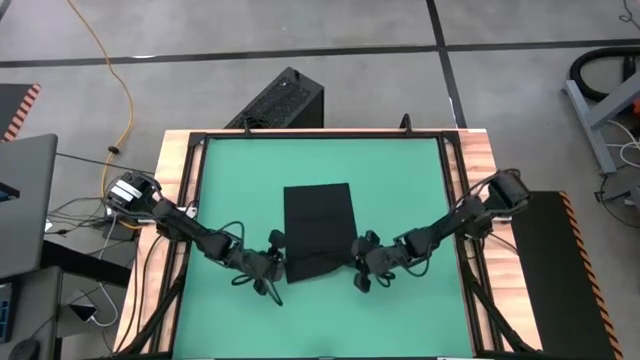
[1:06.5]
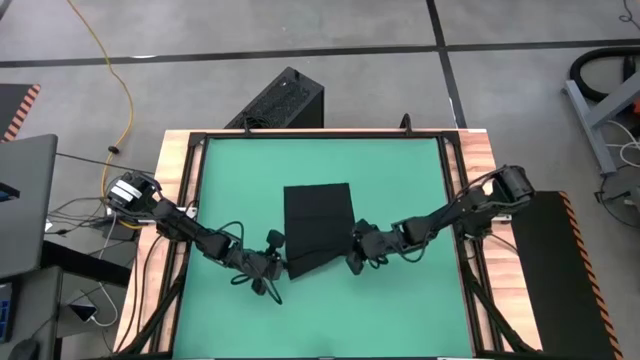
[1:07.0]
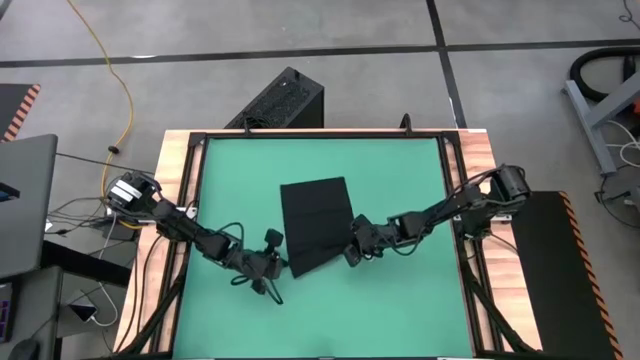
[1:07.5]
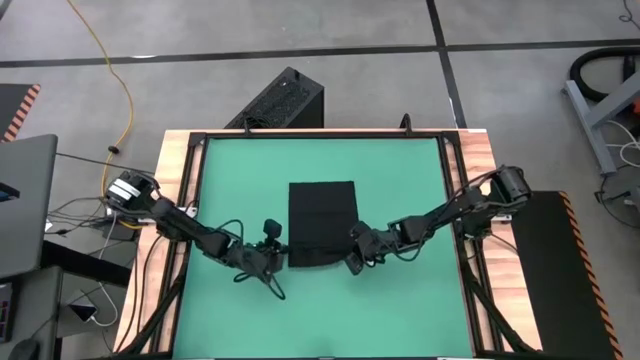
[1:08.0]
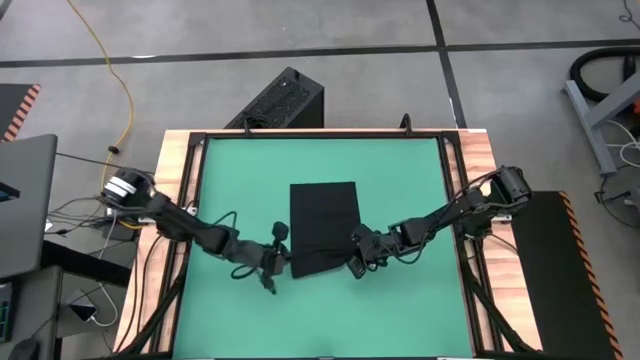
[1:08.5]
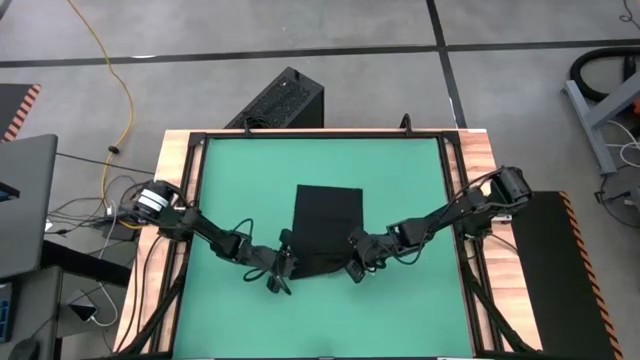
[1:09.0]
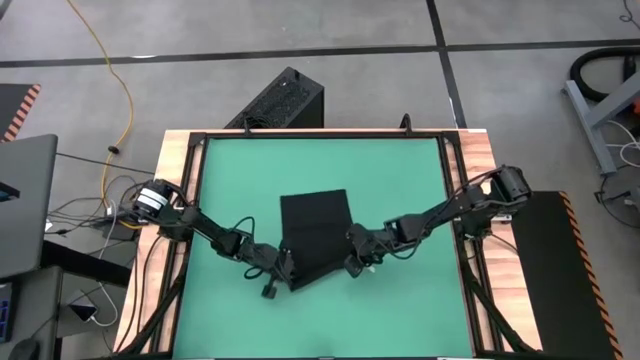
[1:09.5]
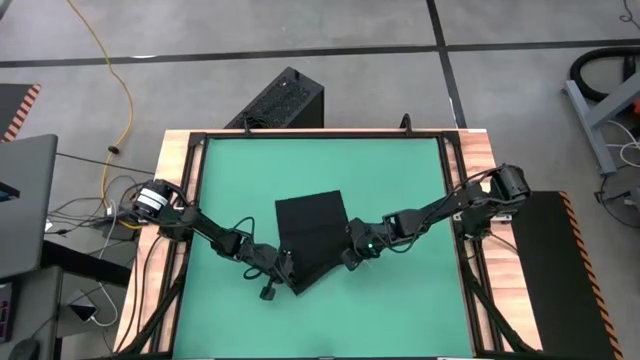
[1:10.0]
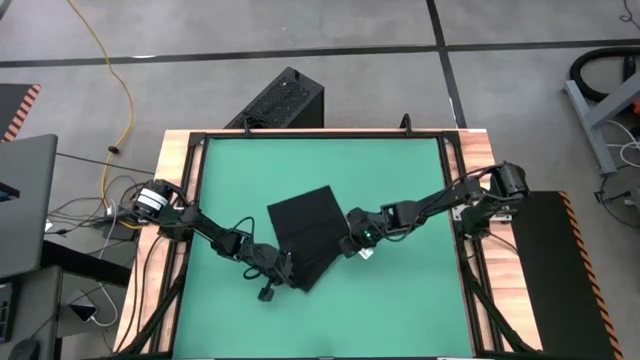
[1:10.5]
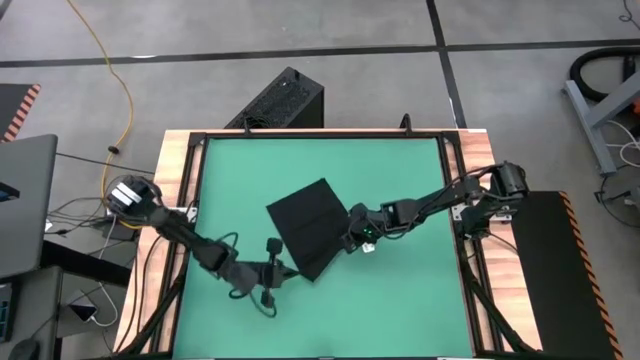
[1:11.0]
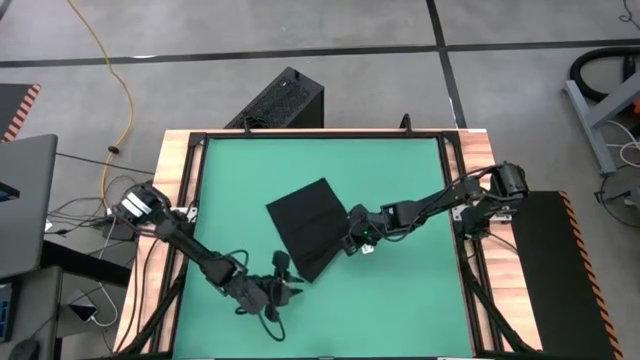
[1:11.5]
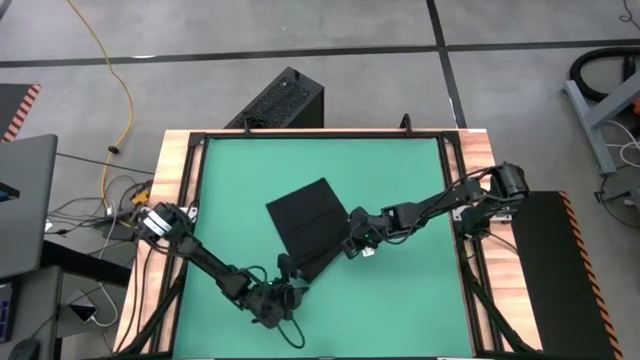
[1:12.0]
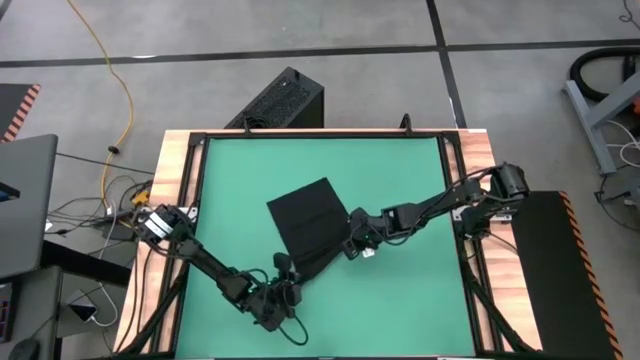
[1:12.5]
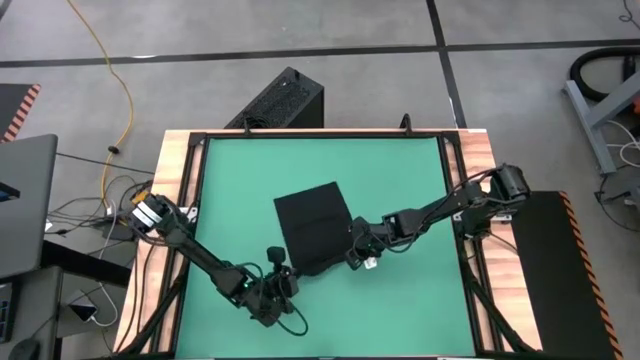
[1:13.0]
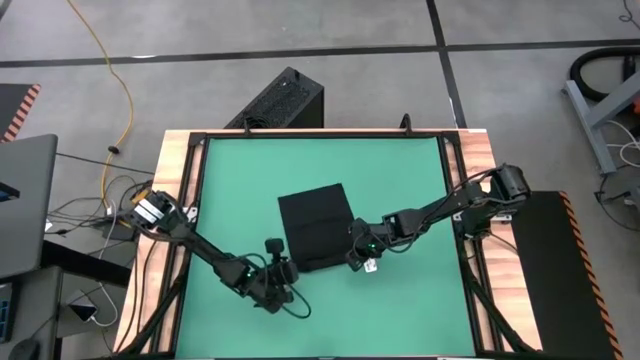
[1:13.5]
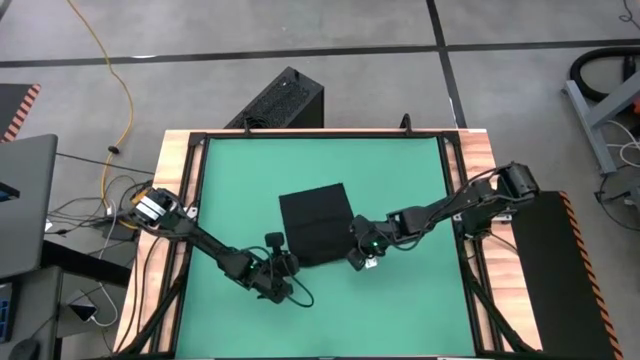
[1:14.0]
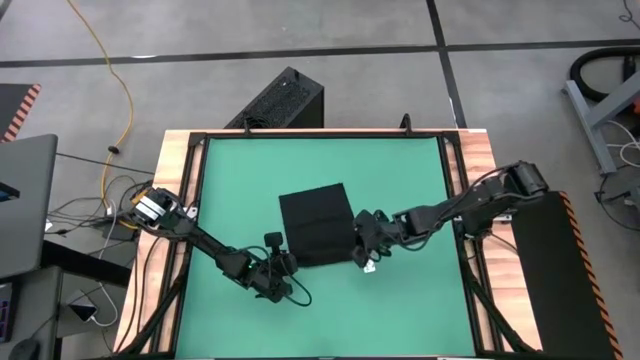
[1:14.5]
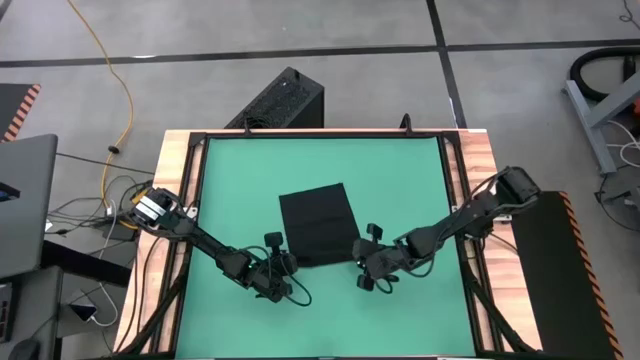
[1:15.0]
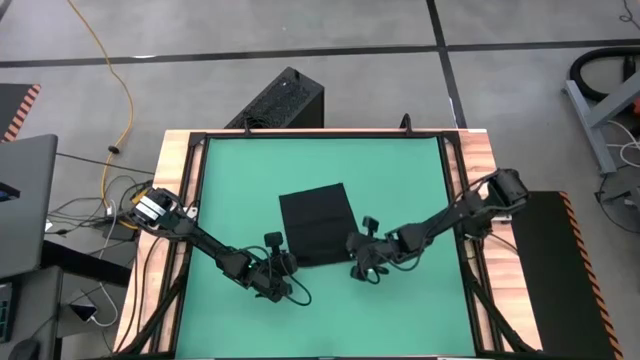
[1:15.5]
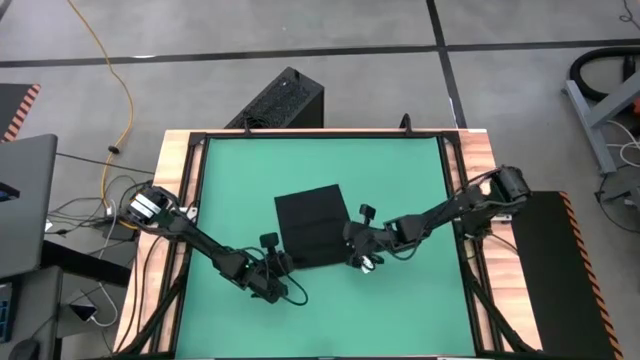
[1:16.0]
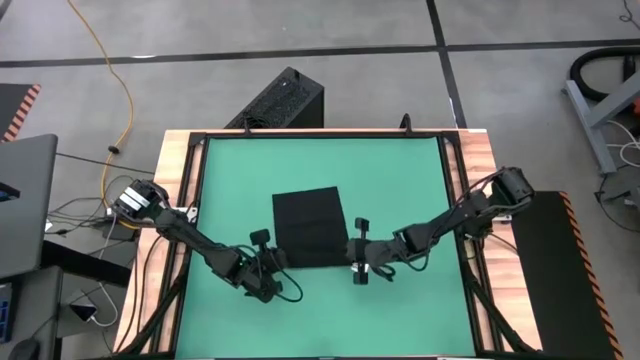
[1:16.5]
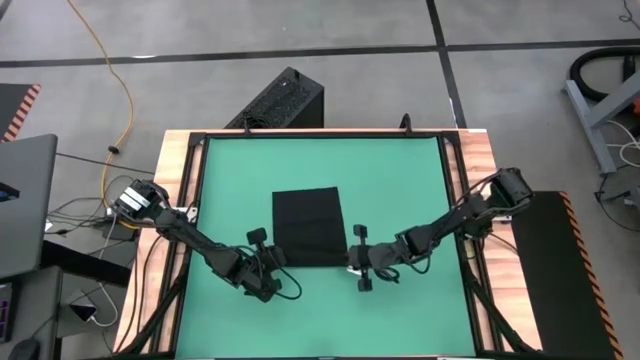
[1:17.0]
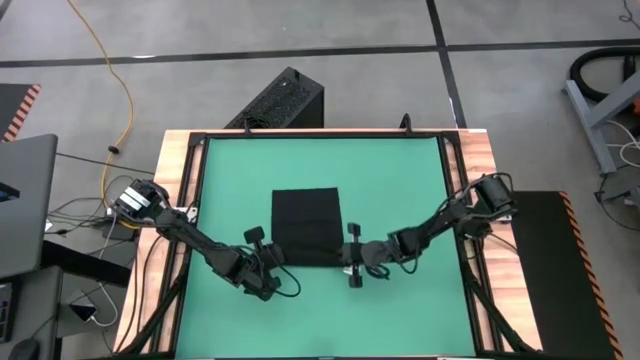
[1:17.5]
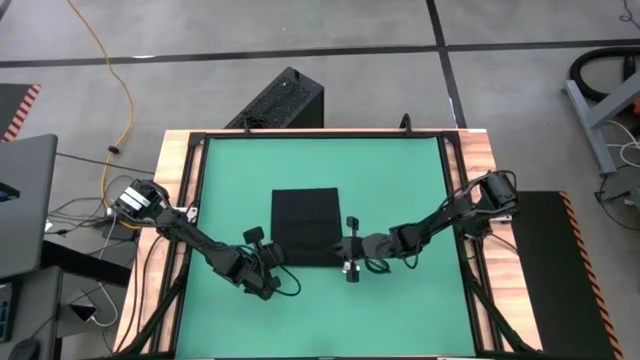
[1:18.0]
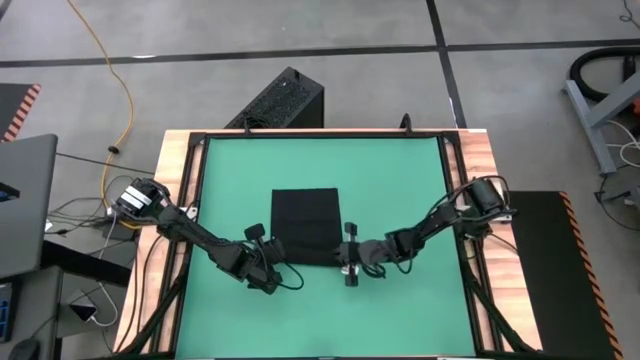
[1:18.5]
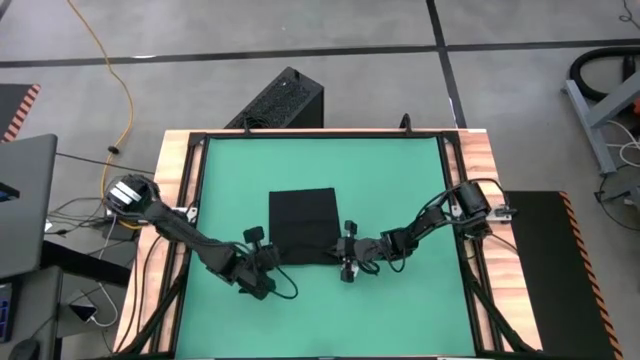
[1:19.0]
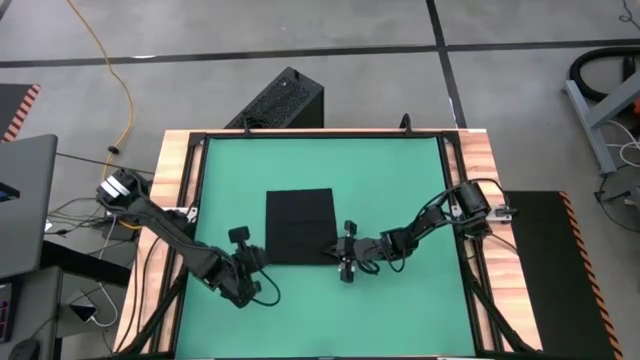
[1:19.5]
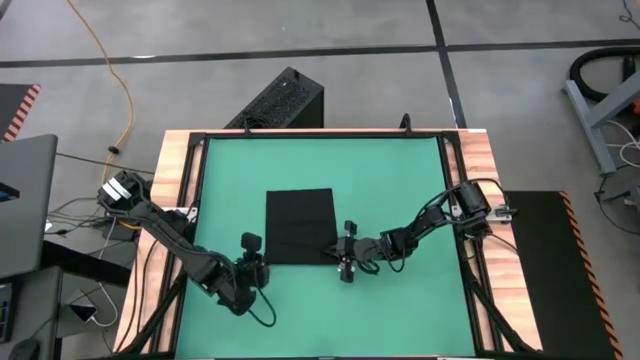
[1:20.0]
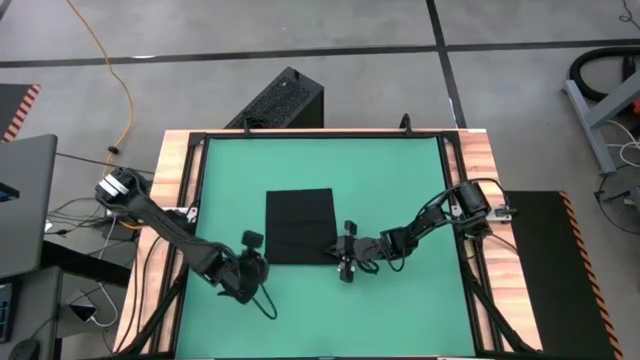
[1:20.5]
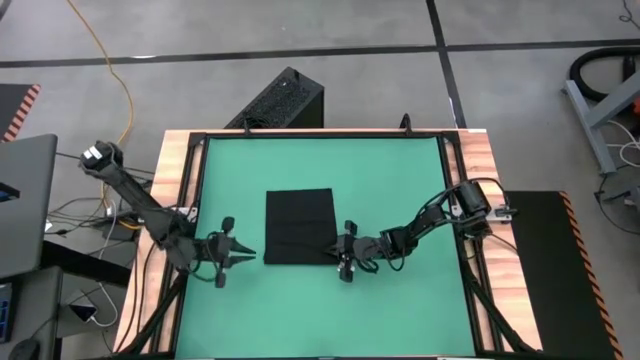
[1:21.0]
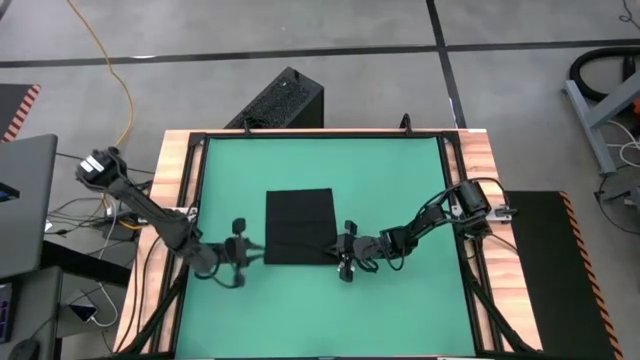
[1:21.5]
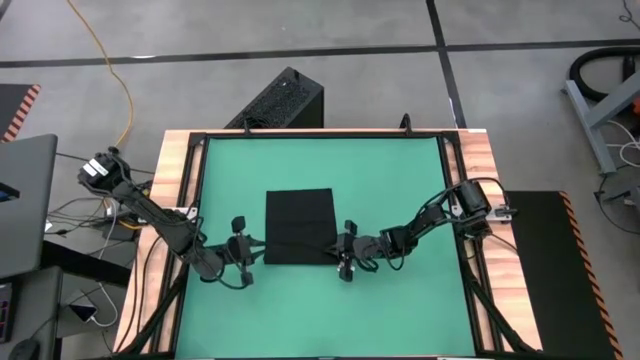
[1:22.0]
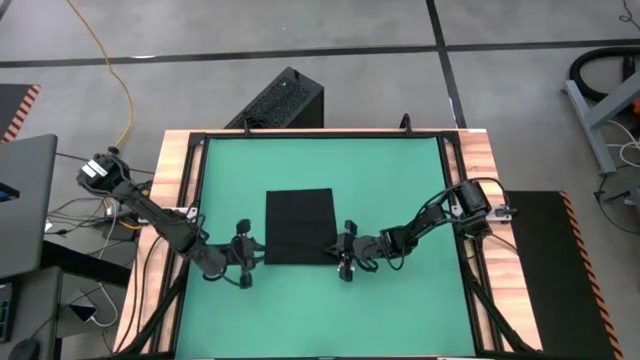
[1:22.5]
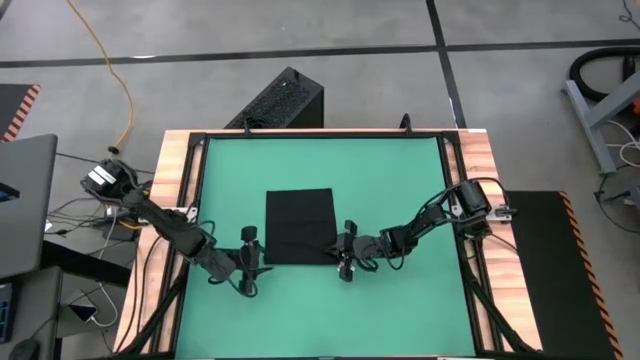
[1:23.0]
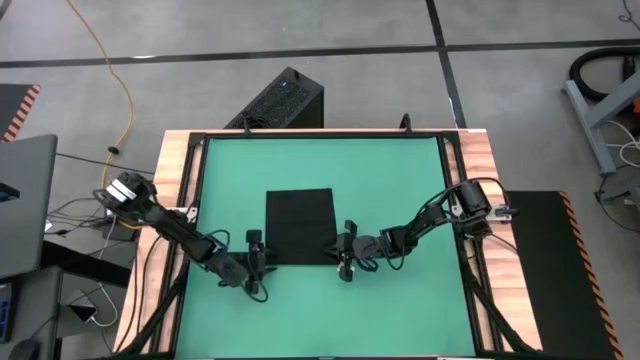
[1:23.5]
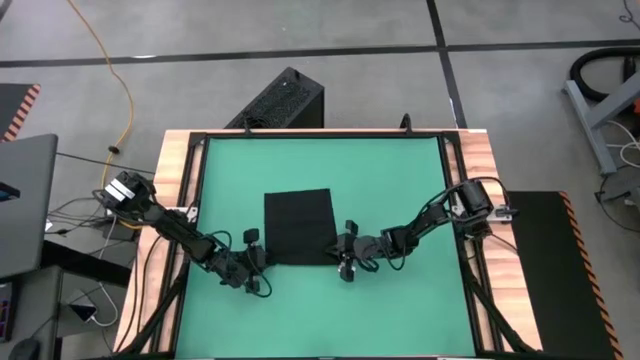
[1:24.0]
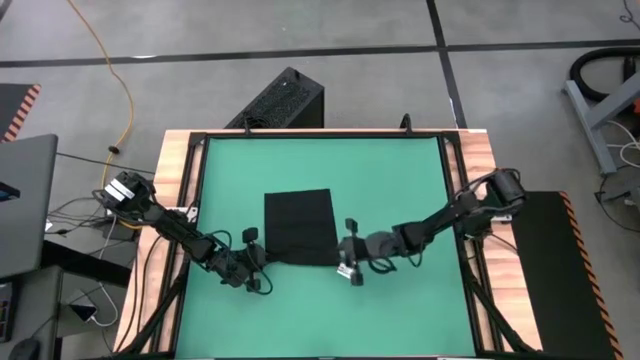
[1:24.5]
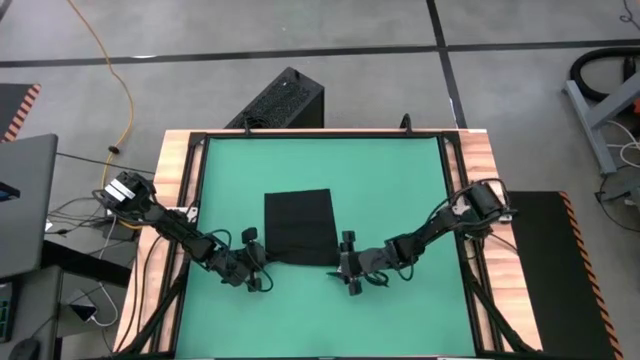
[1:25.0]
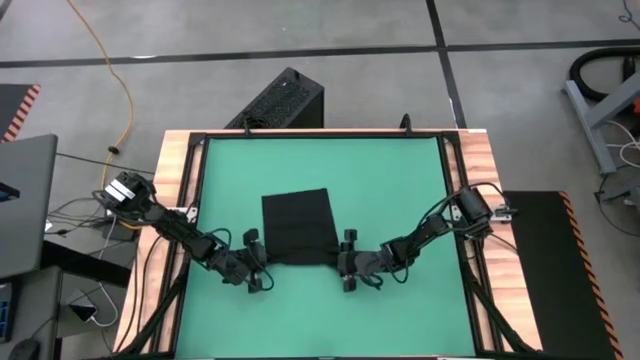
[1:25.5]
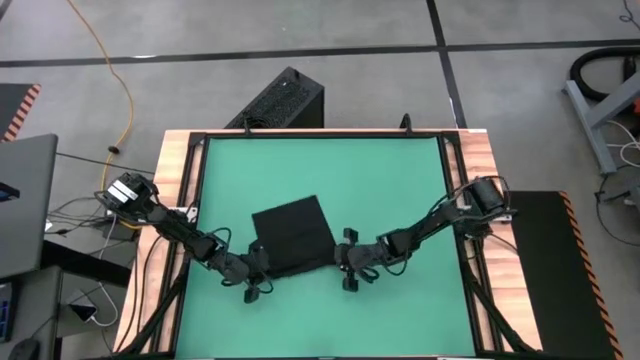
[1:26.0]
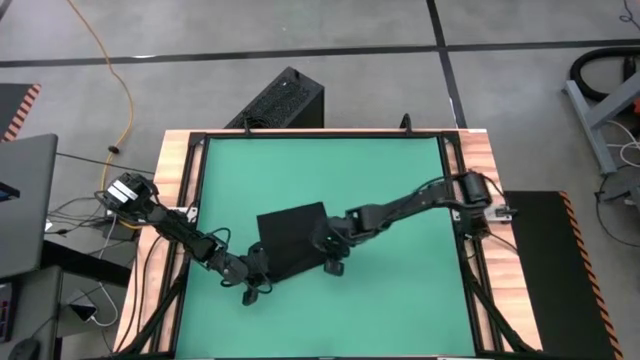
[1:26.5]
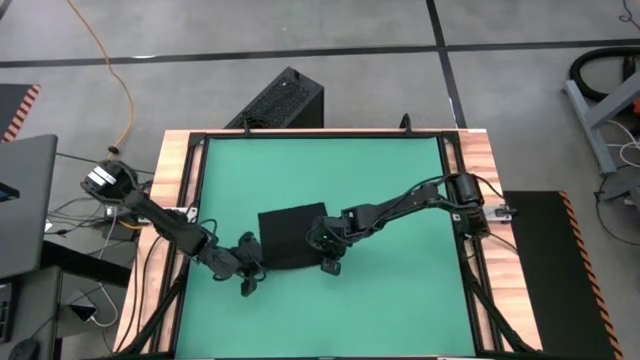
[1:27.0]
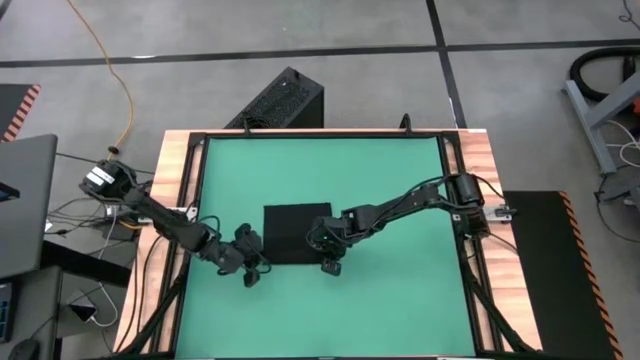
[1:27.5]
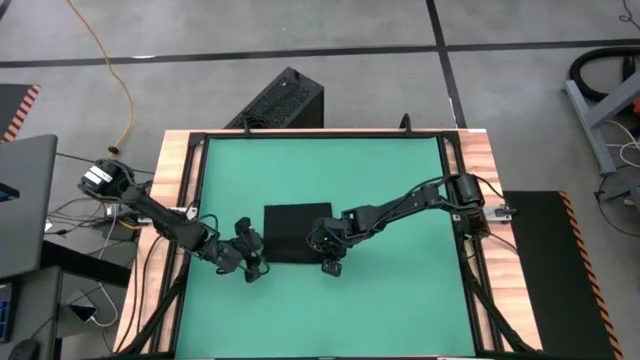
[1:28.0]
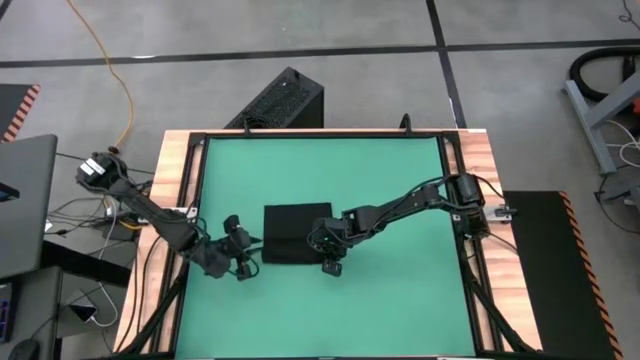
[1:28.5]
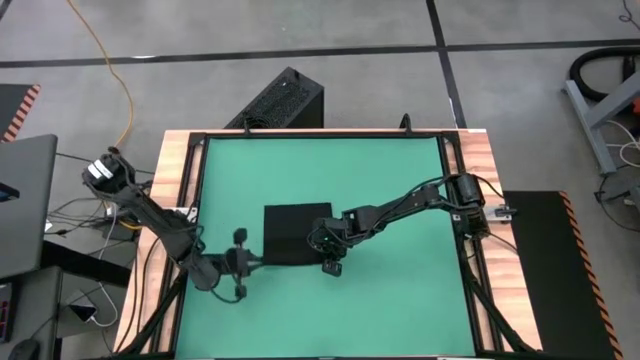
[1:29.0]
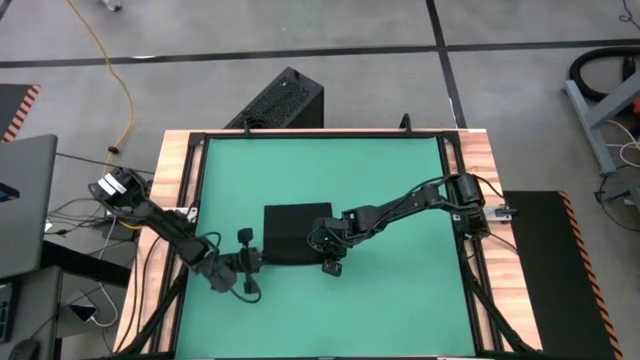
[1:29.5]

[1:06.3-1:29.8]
Task: Roll towel
Roll the black towel
